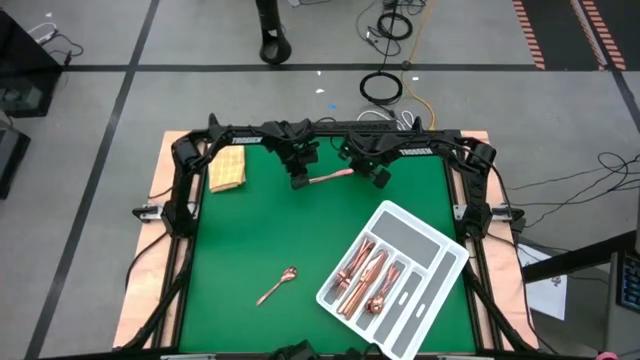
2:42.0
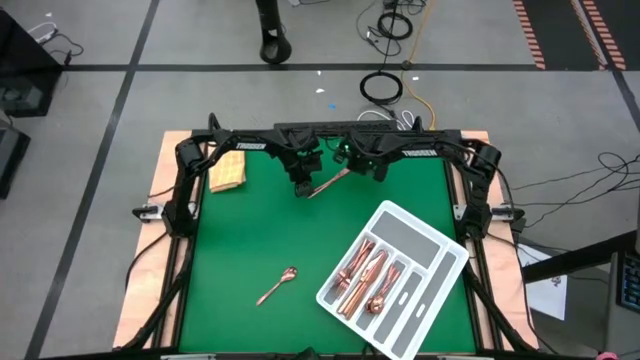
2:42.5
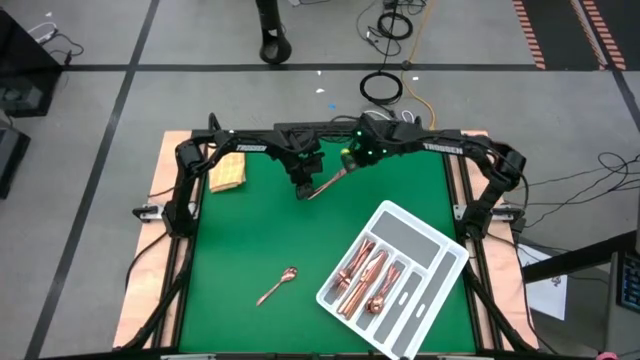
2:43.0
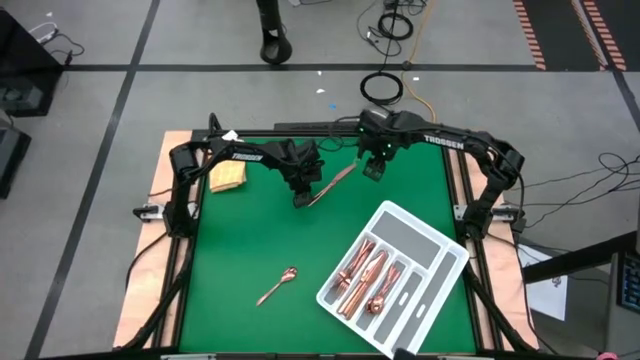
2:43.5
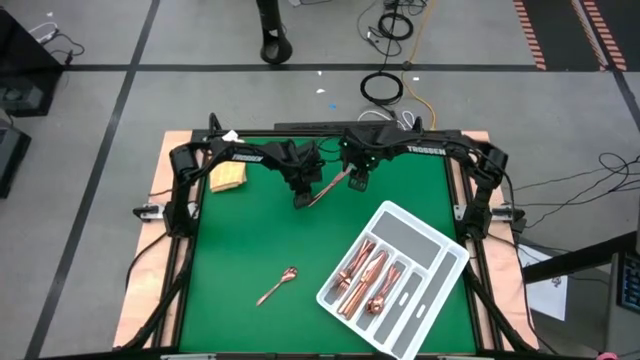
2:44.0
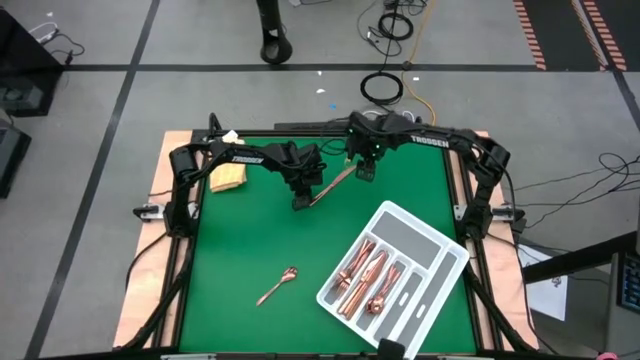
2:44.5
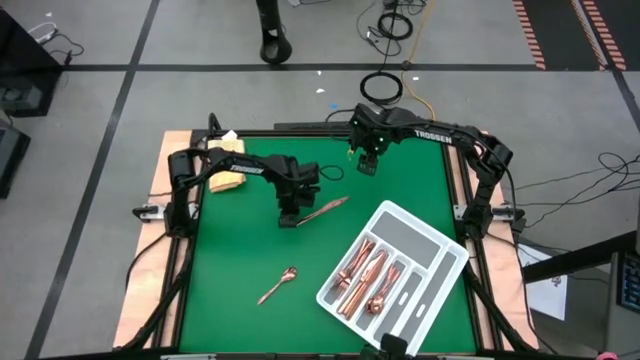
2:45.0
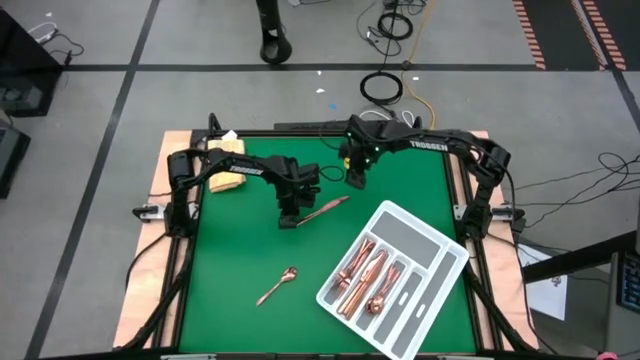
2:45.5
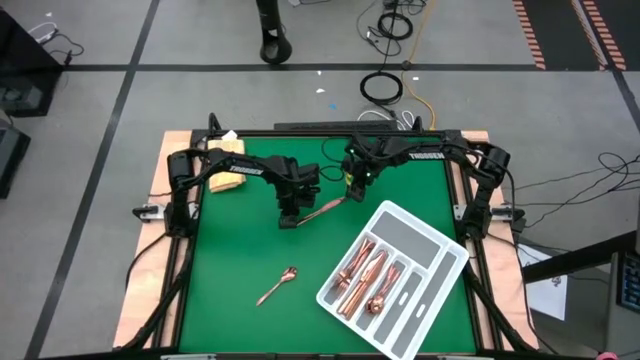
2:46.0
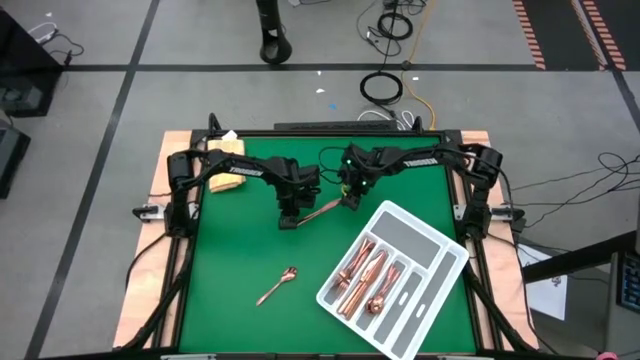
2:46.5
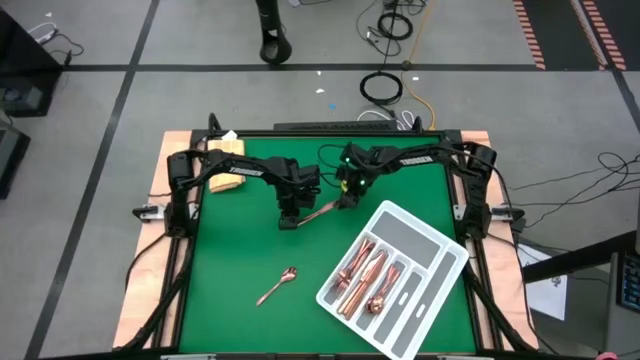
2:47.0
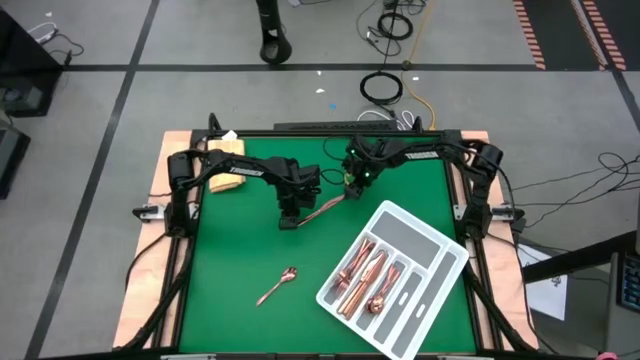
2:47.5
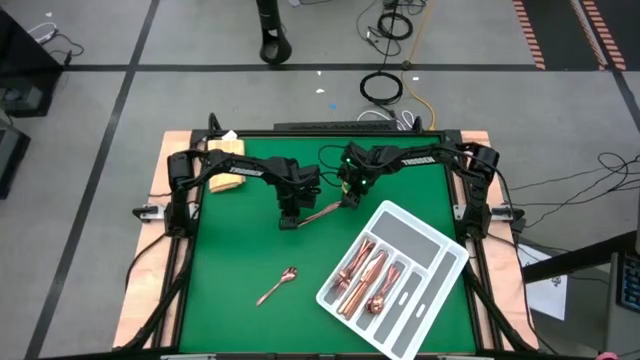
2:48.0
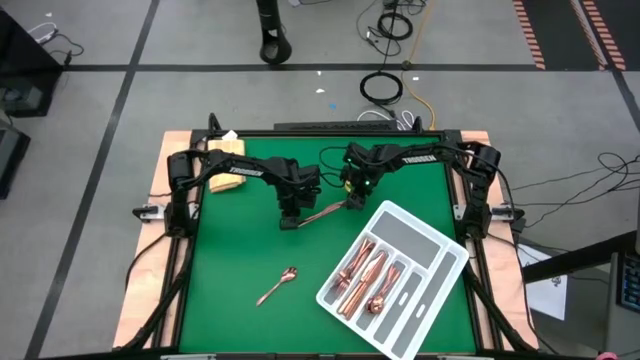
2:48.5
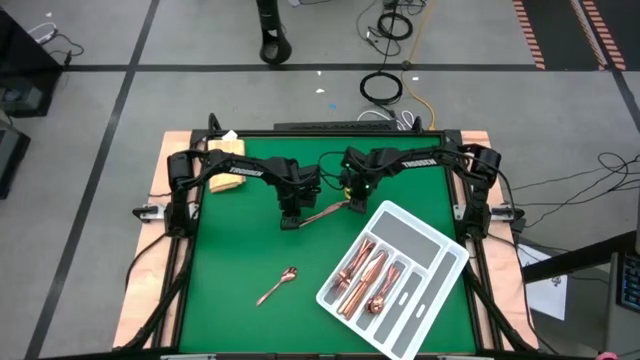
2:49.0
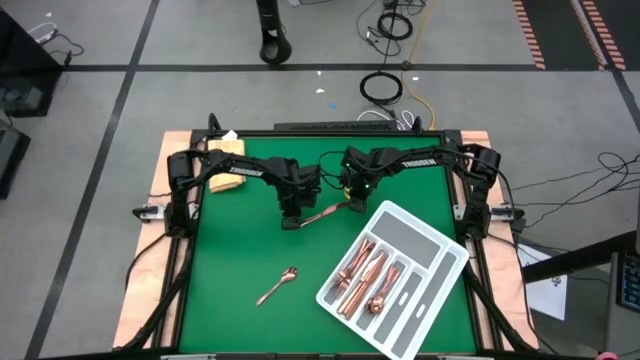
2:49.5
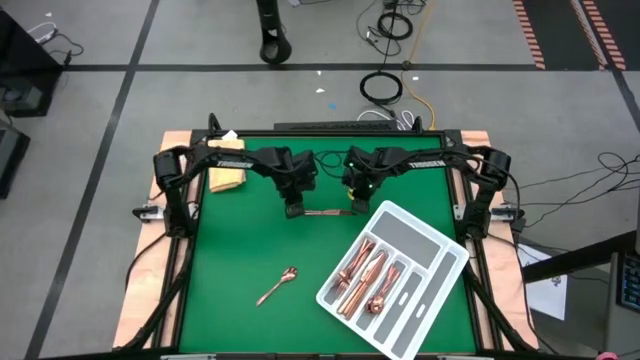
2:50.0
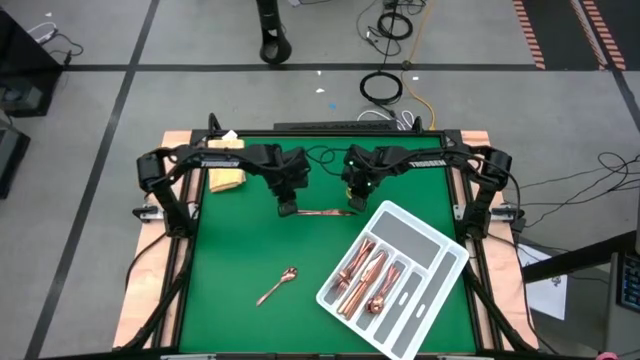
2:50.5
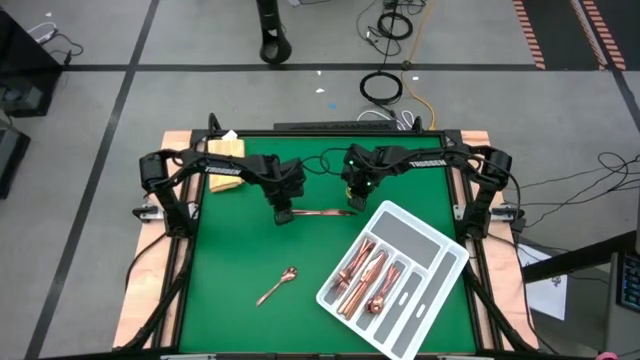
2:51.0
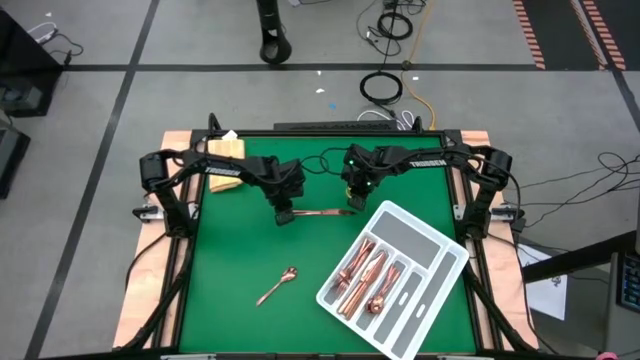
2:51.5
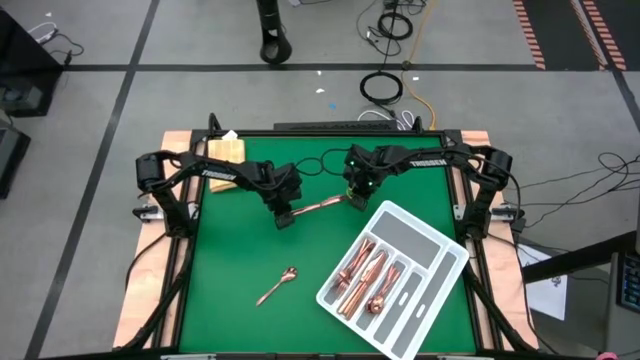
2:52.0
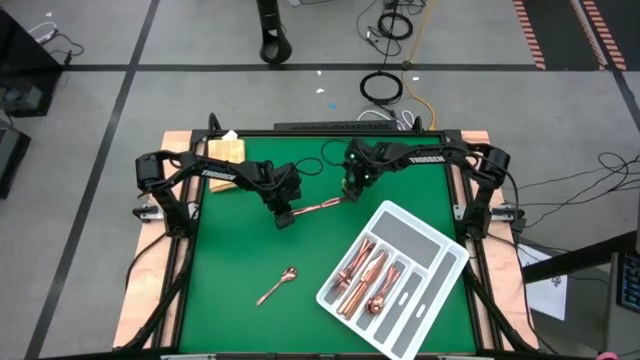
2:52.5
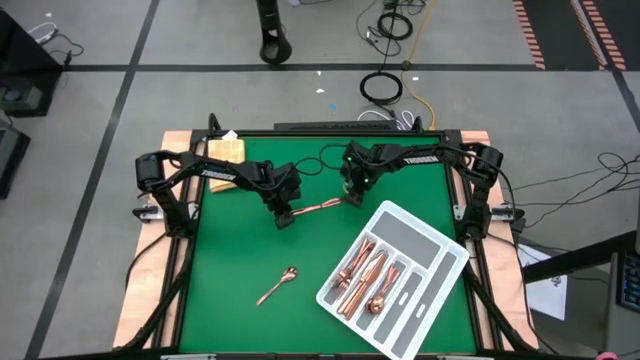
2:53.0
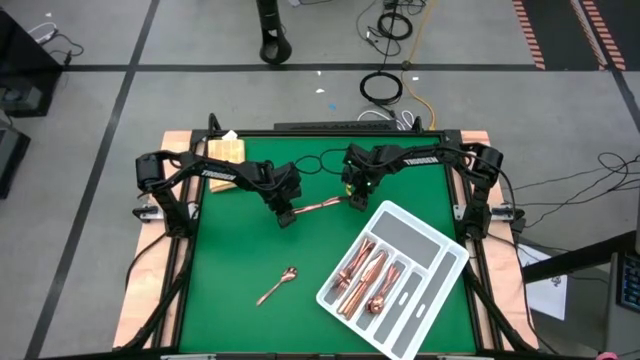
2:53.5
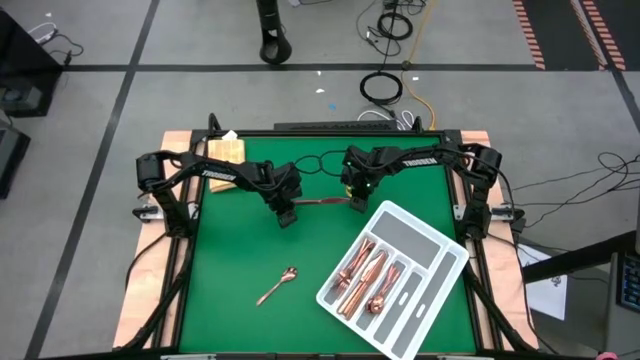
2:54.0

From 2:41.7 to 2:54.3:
Task: Sort silverware
Put the bronze knife into the silverware tray

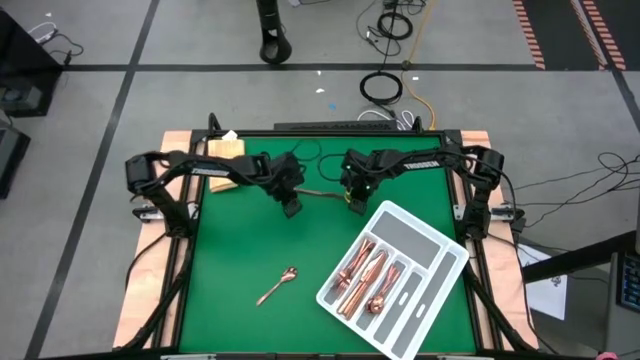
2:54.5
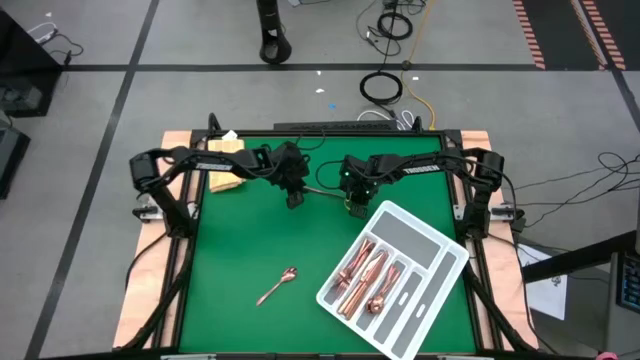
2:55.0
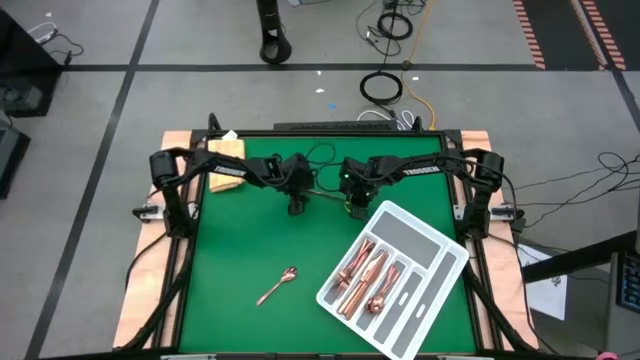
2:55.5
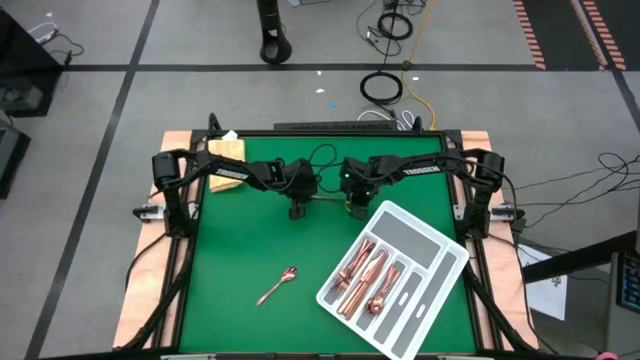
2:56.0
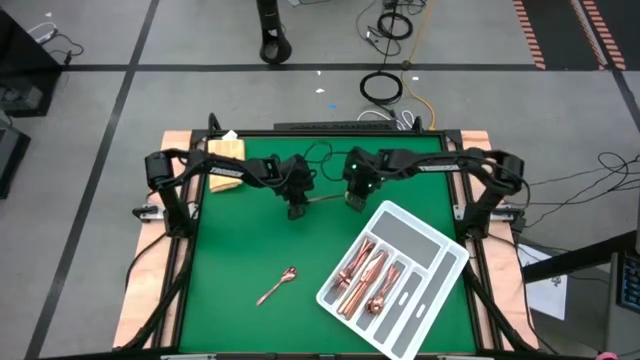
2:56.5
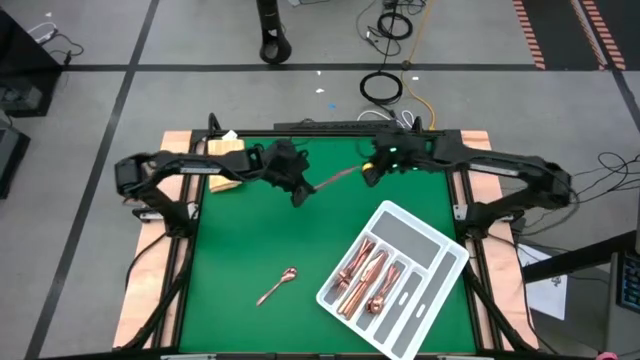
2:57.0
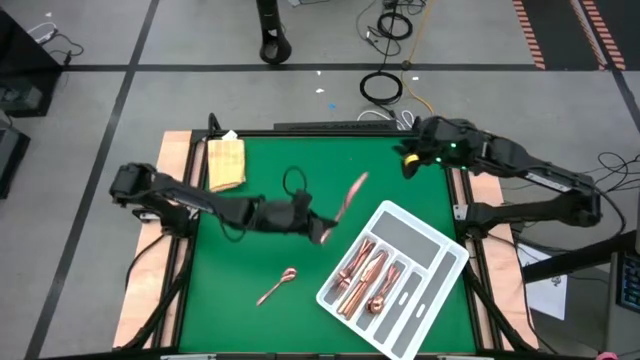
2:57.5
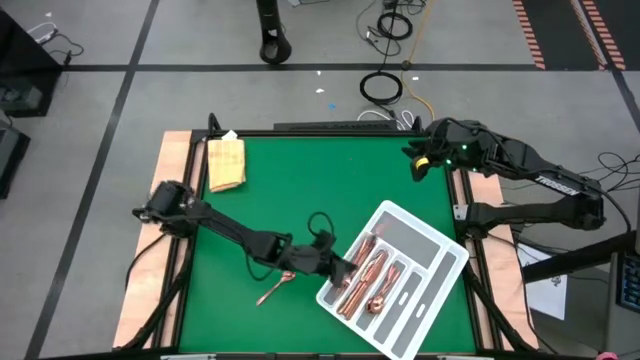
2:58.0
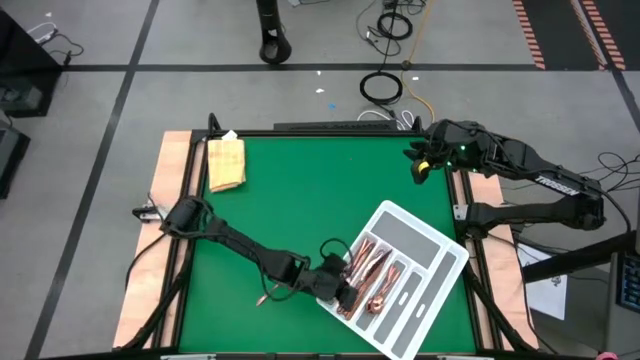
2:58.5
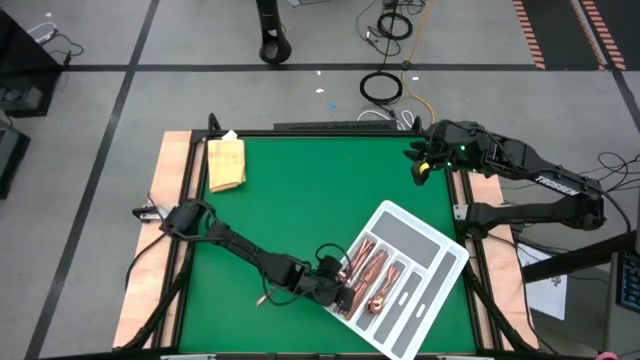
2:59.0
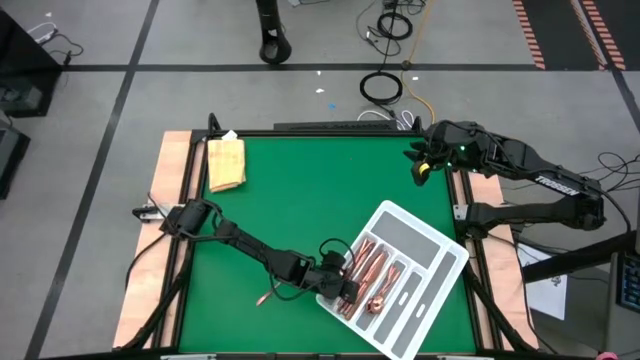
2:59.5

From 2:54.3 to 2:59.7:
Put the bronze knife into the silverware tray

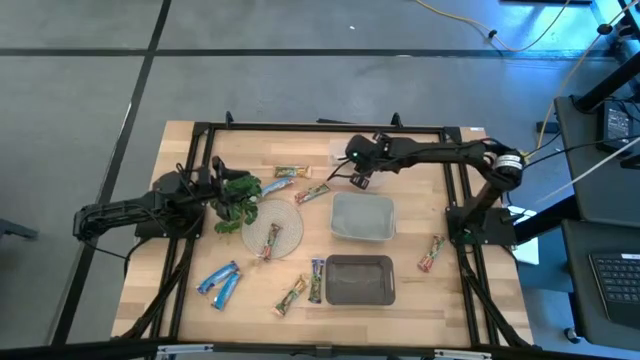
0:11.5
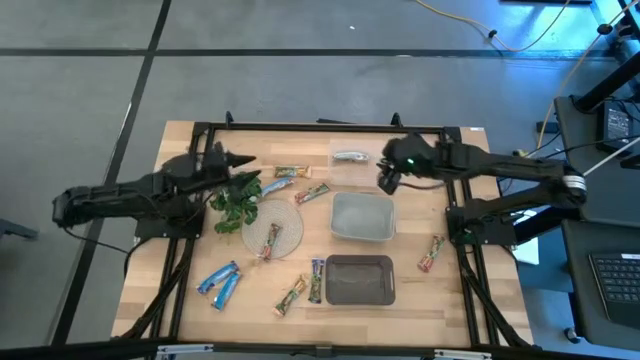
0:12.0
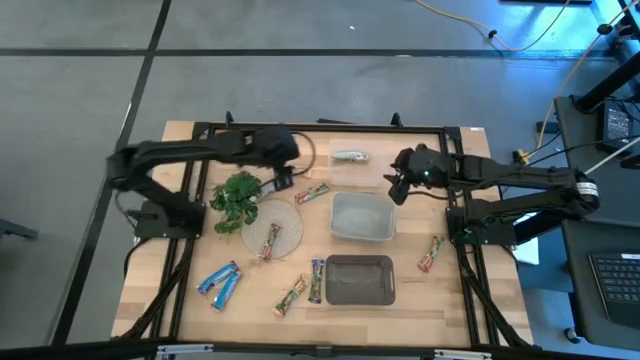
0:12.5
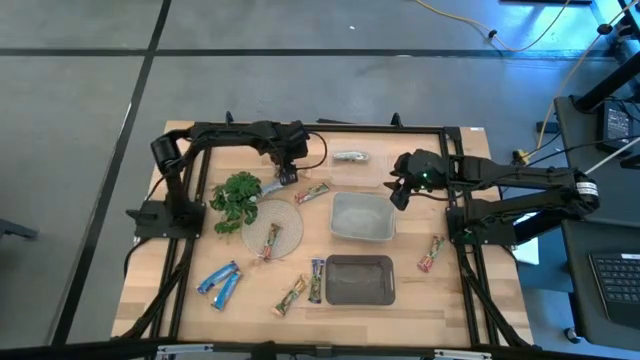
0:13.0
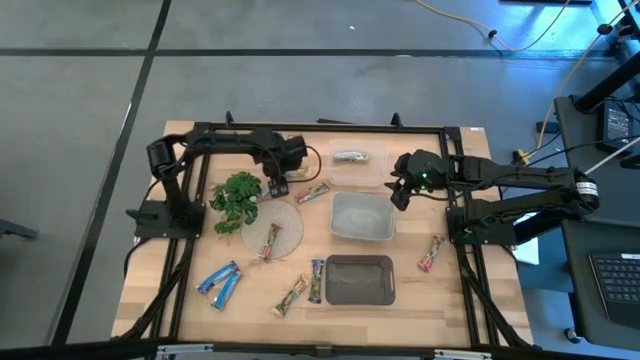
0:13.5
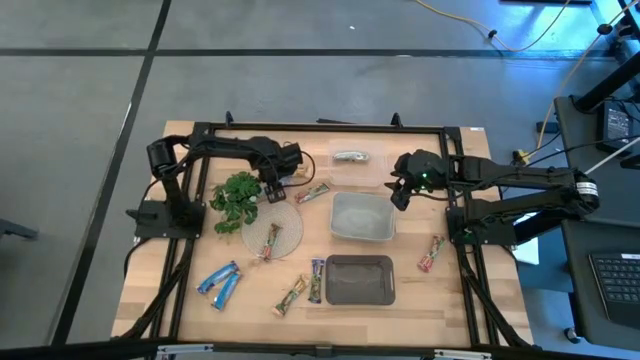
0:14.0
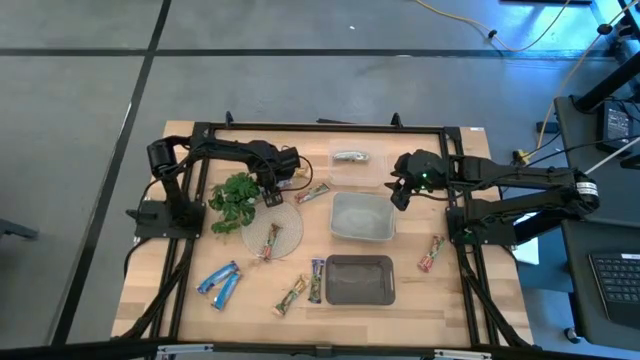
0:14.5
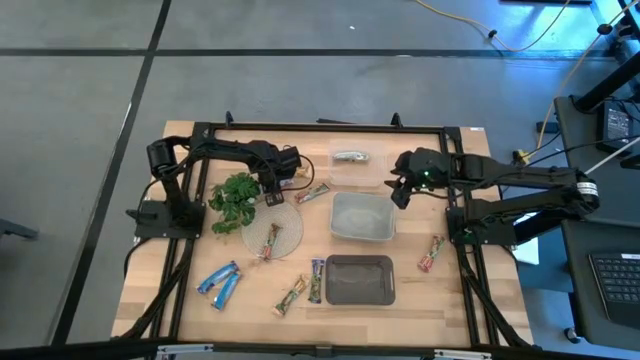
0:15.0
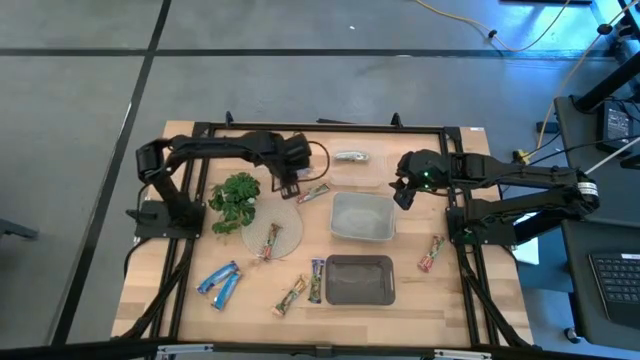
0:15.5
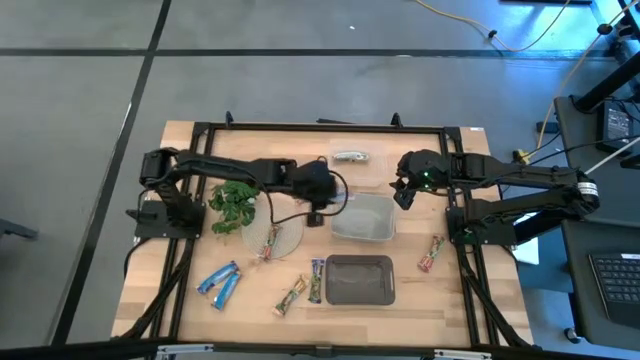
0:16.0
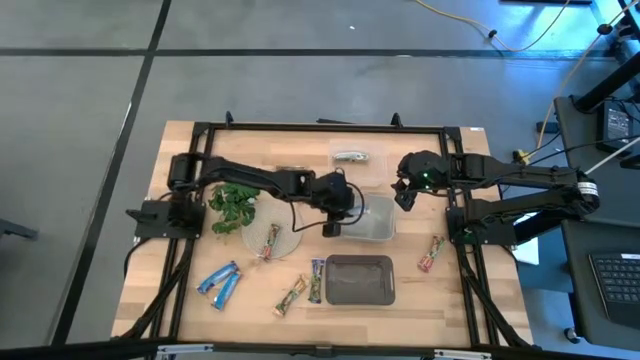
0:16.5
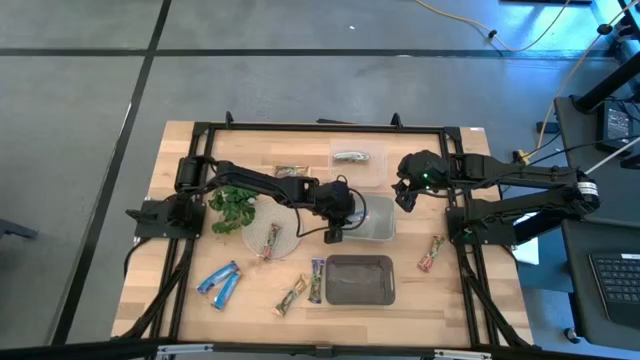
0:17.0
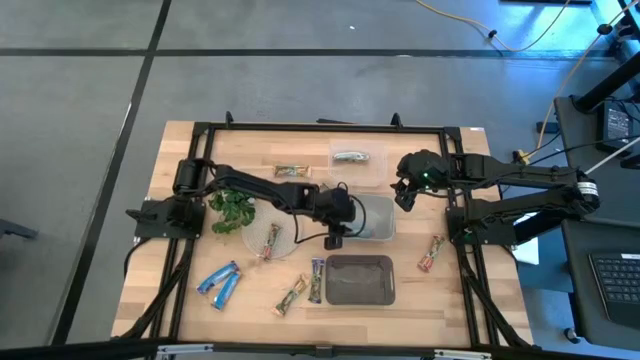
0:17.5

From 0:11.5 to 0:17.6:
Task: Pick and place Granola Bars by type
Put the red granola bar into the gray bin
